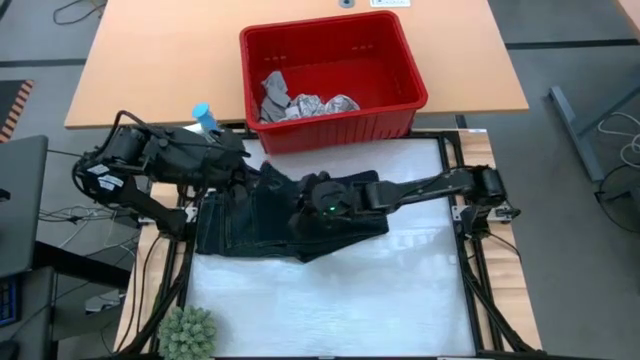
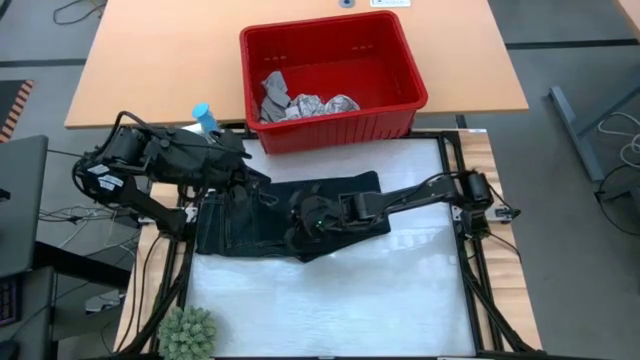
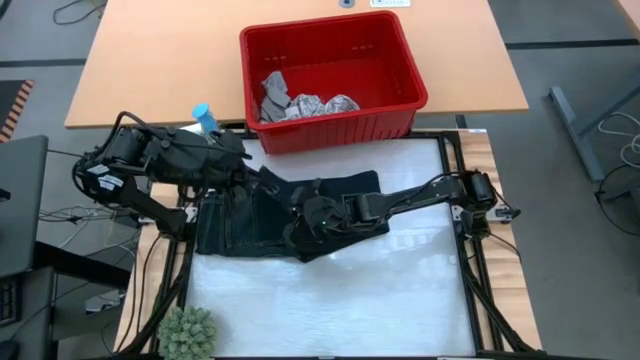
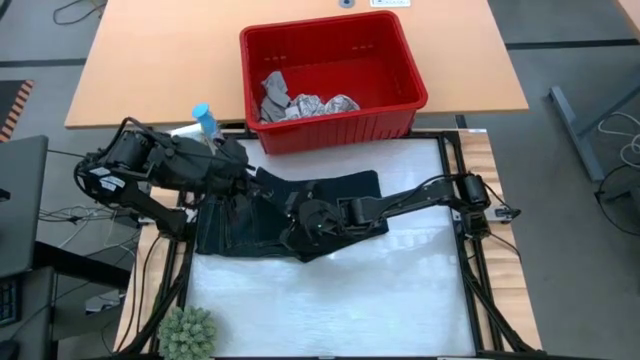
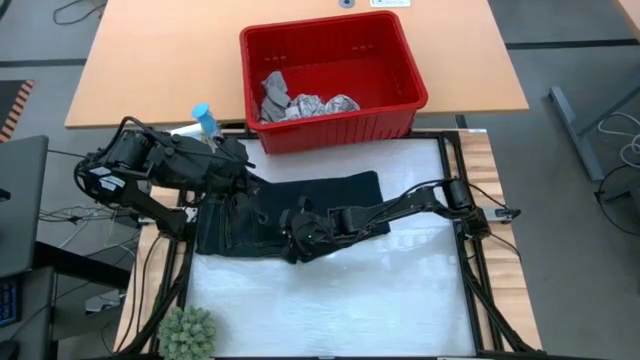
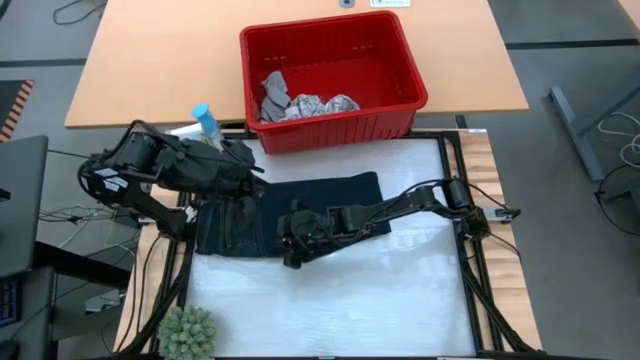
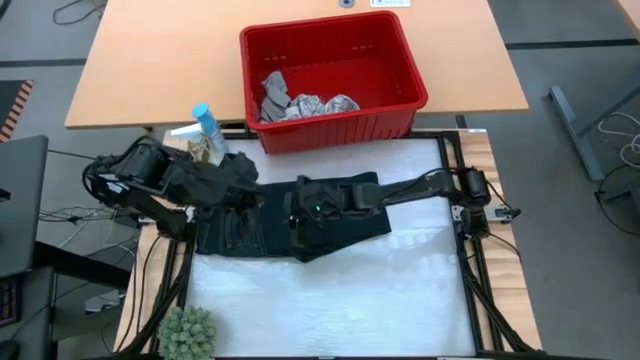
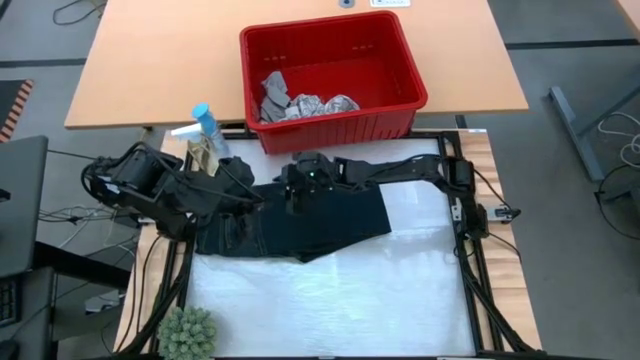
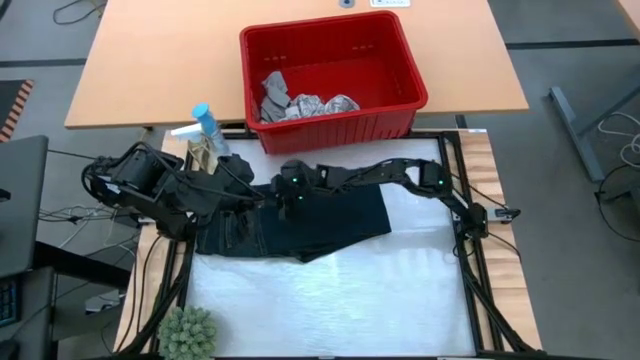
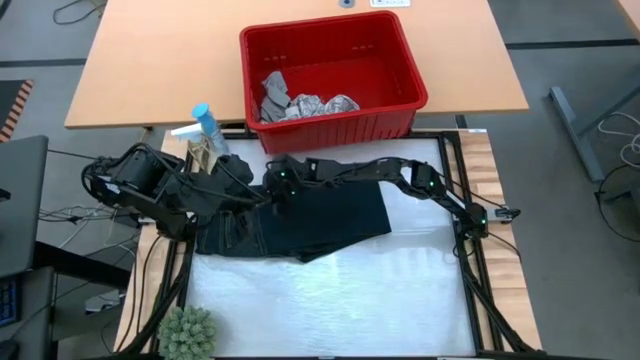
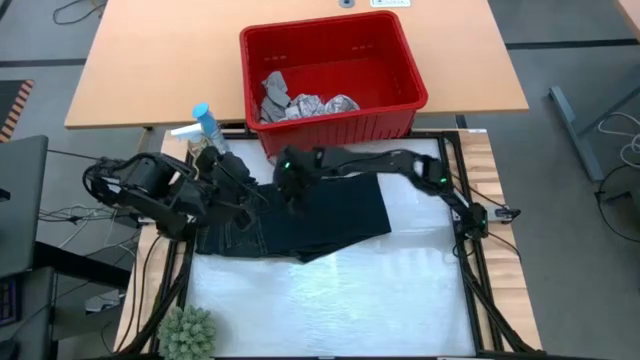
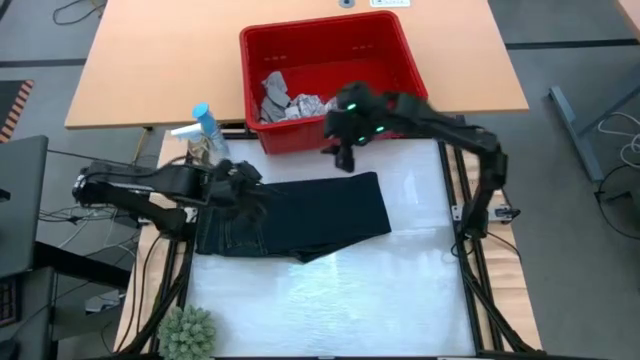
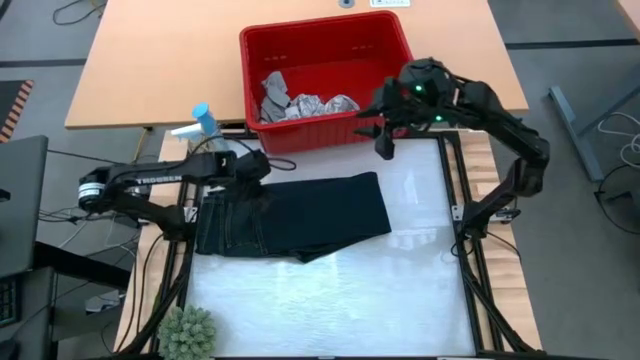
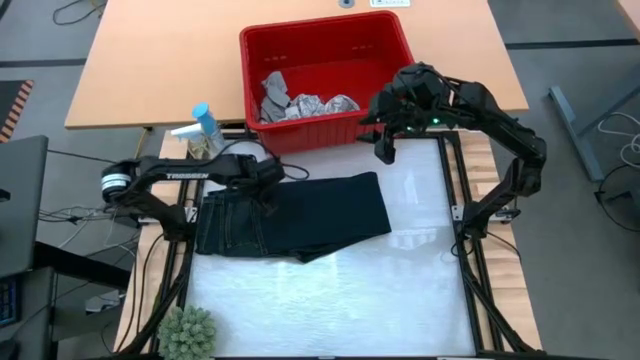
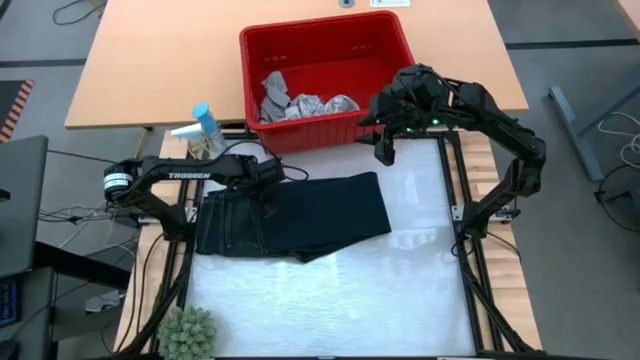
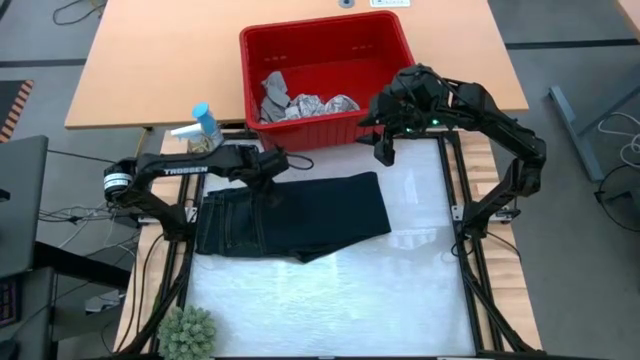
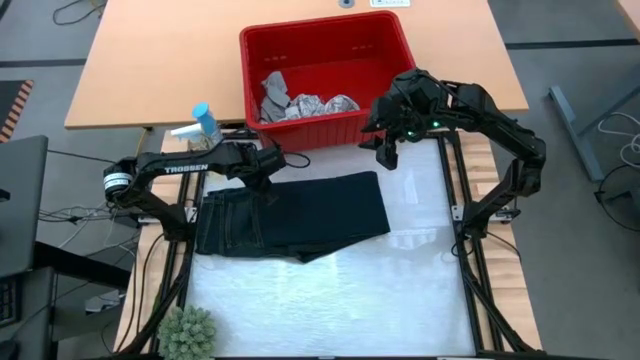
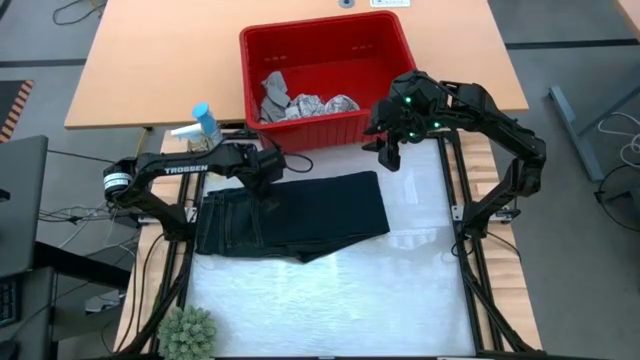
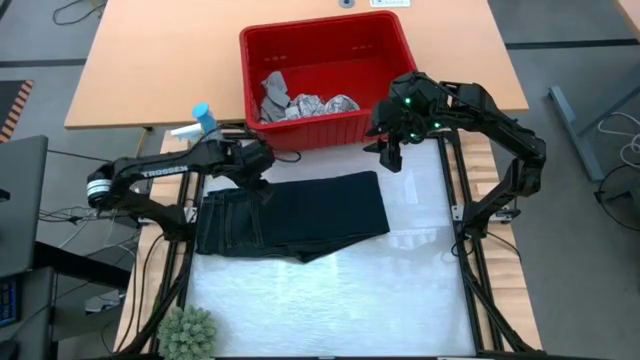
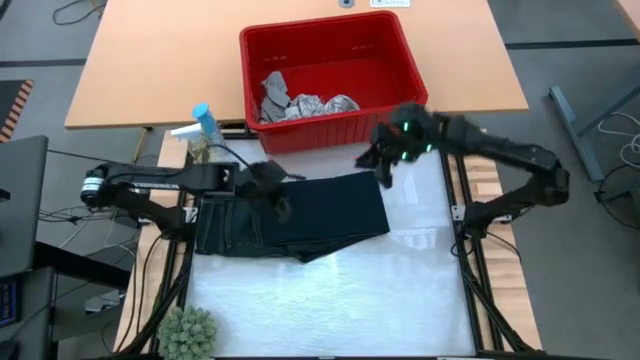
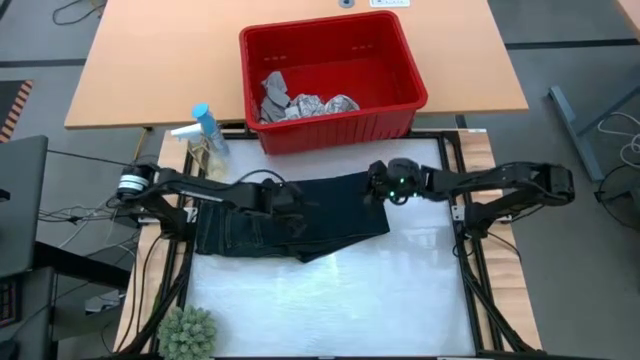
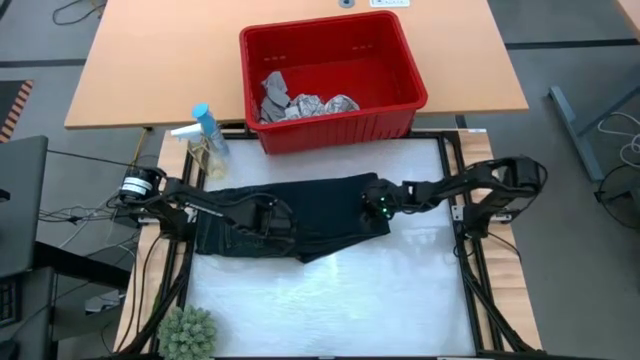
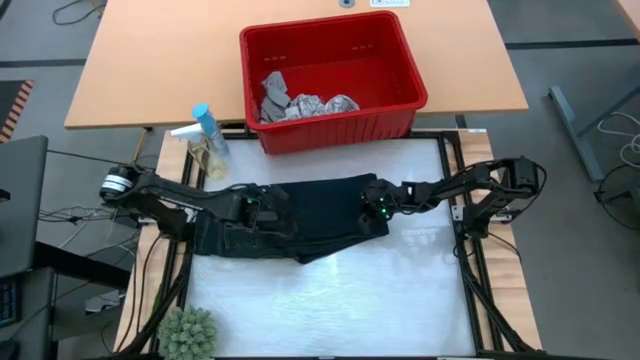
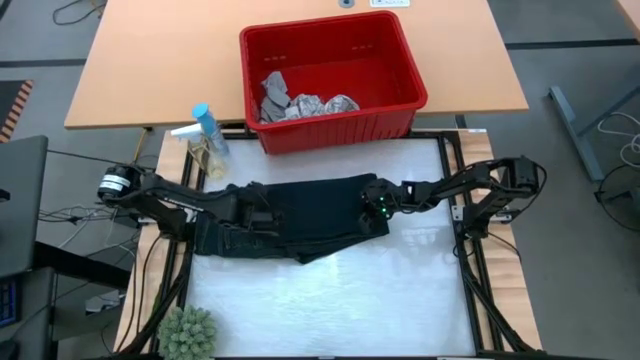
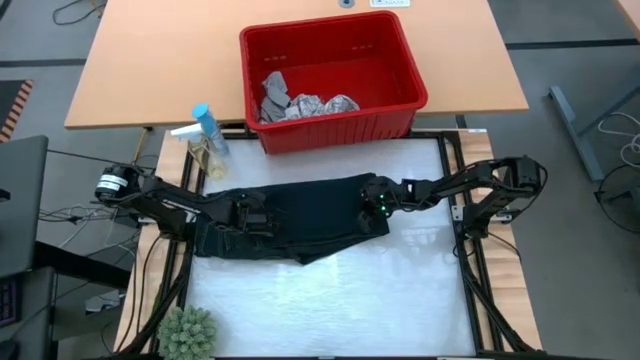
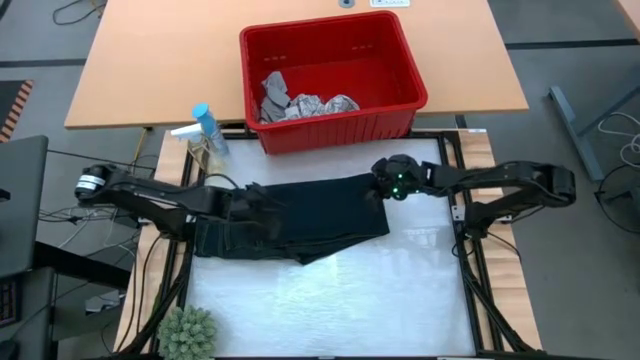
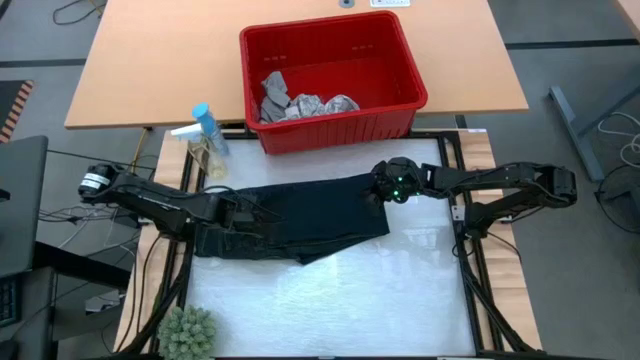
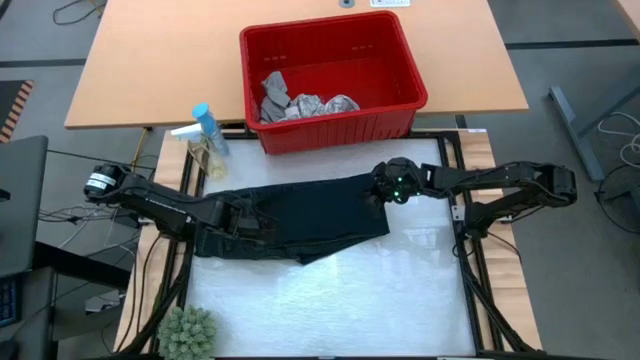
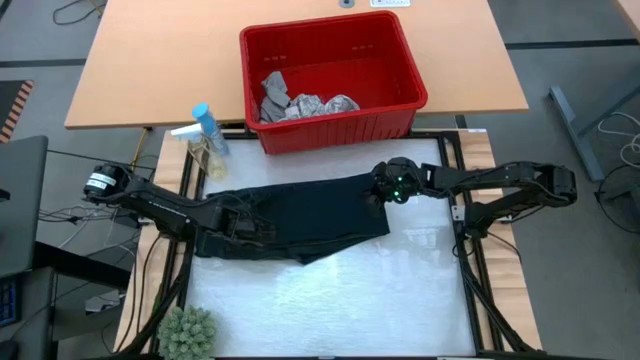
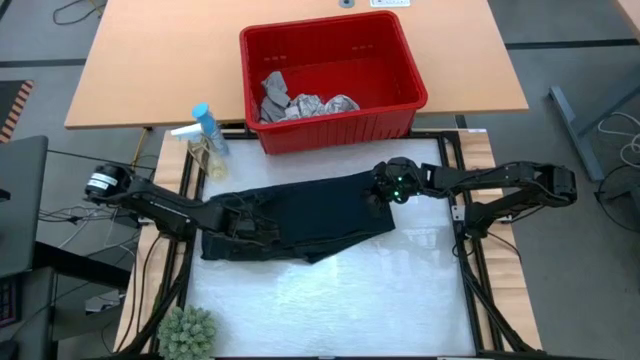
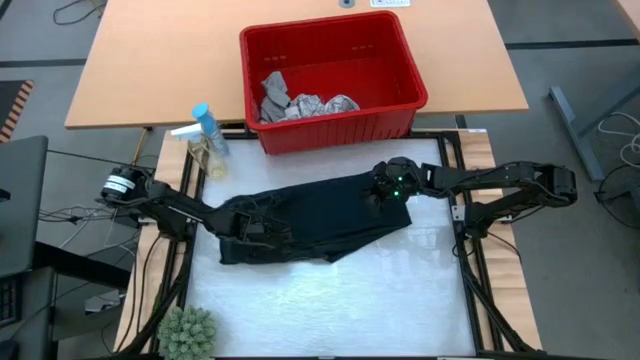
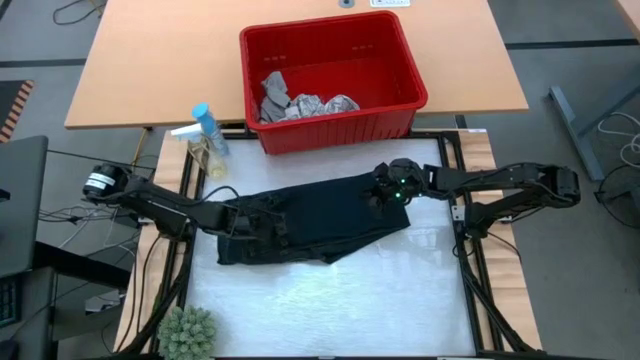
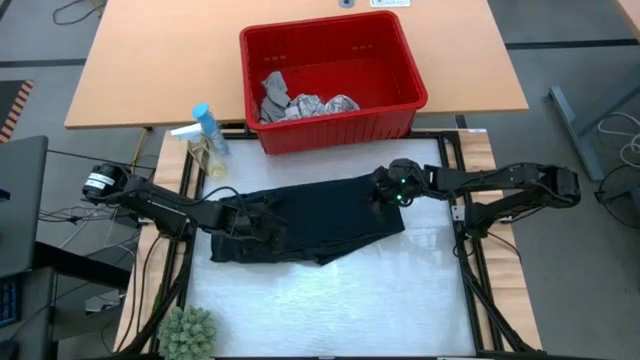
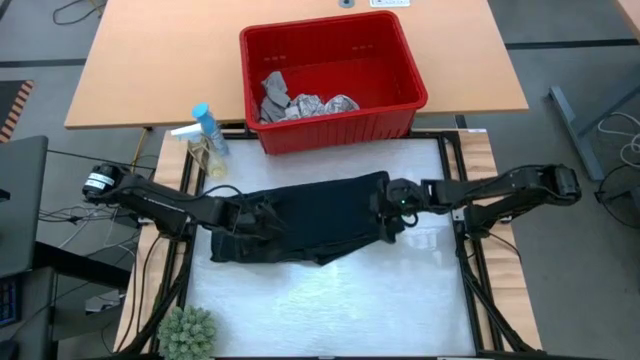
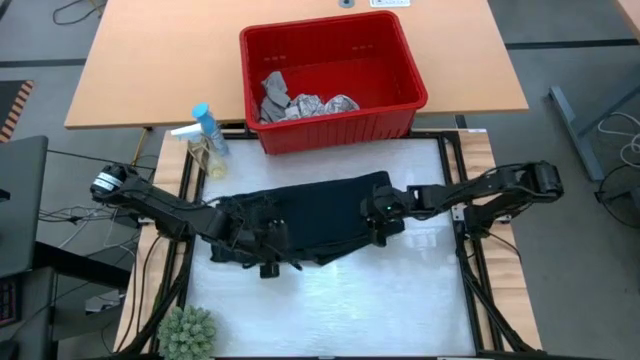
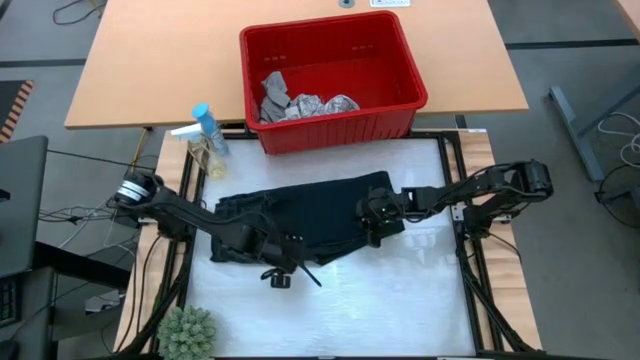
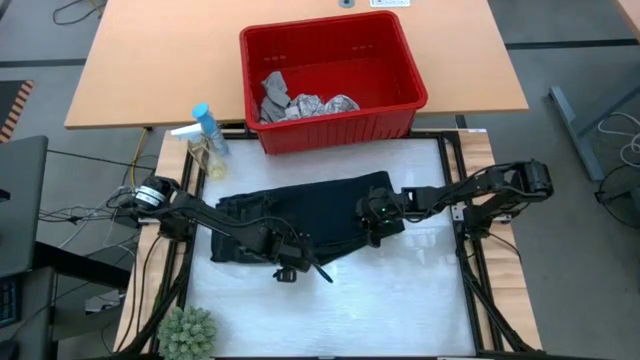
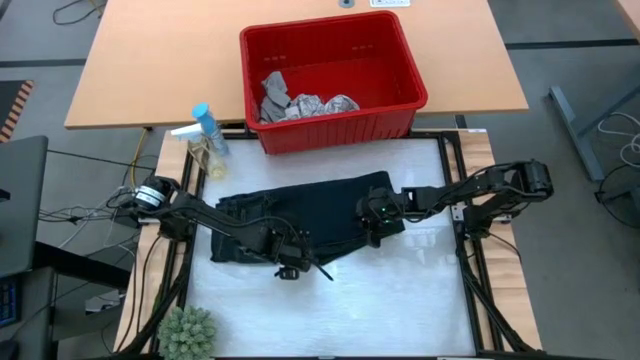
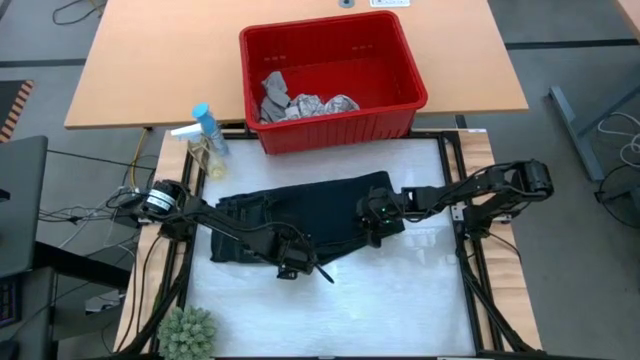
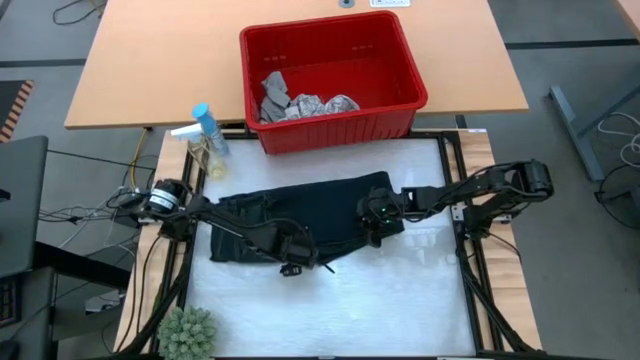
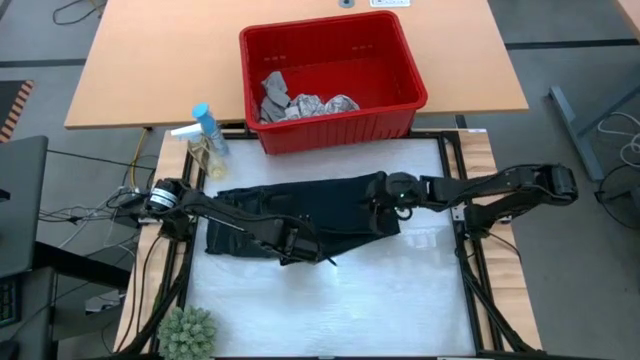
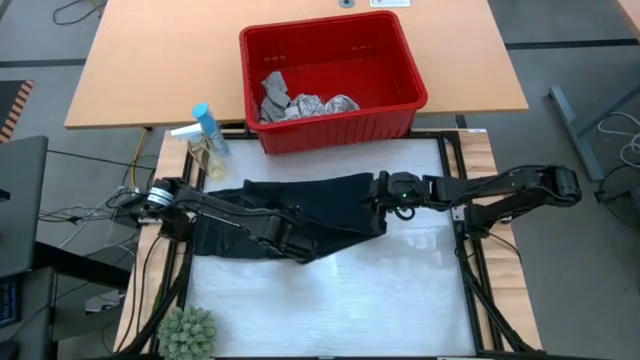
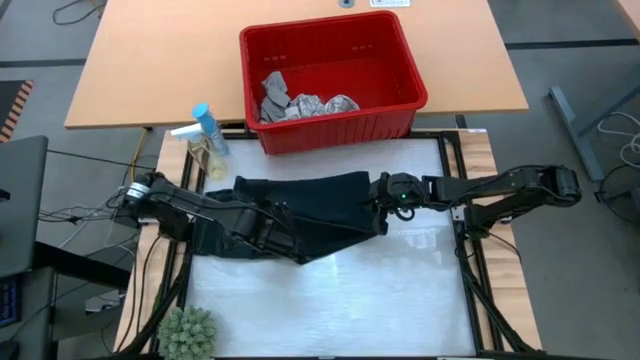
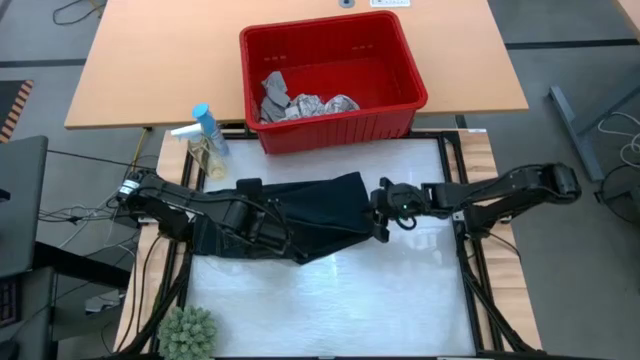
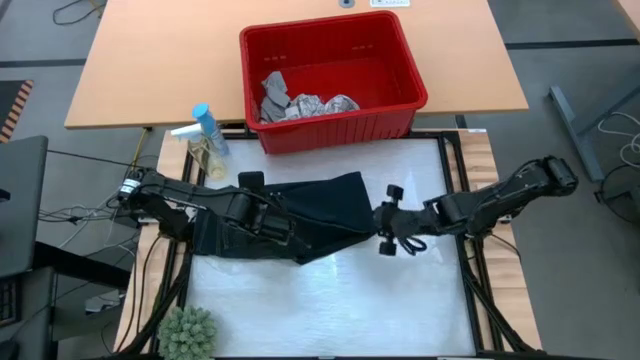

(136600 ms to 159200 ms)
Task: Fold Laundry from Bin
Fold the blue jeans
